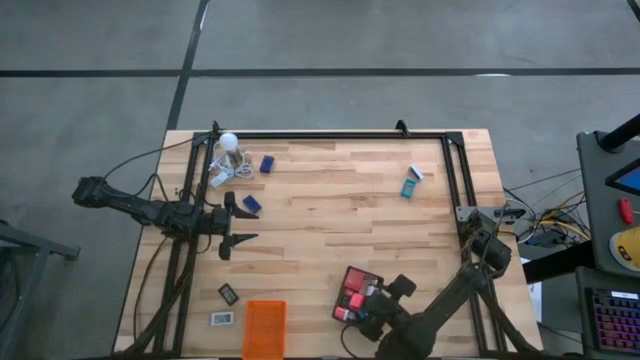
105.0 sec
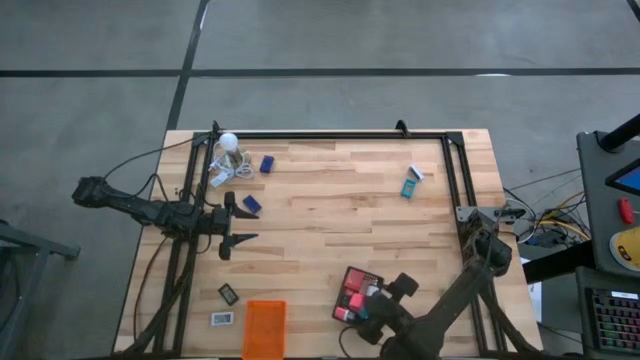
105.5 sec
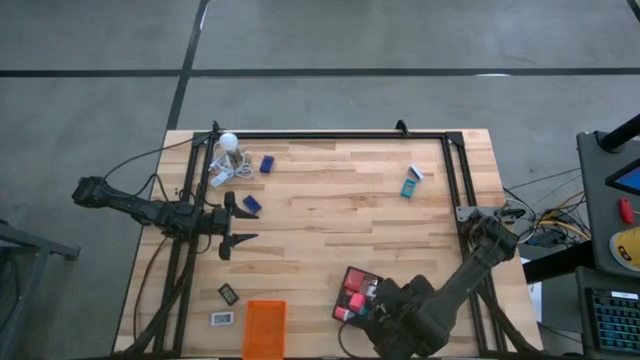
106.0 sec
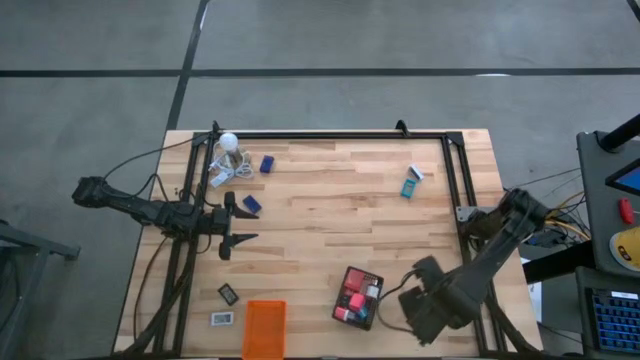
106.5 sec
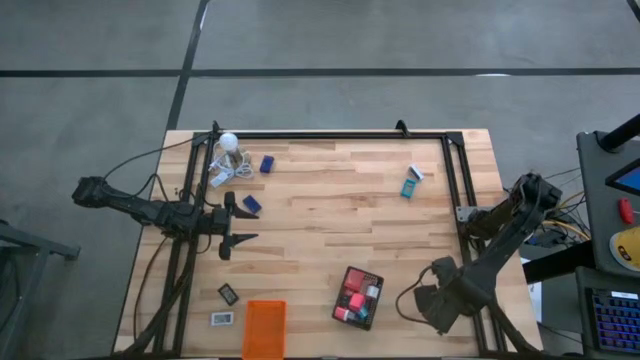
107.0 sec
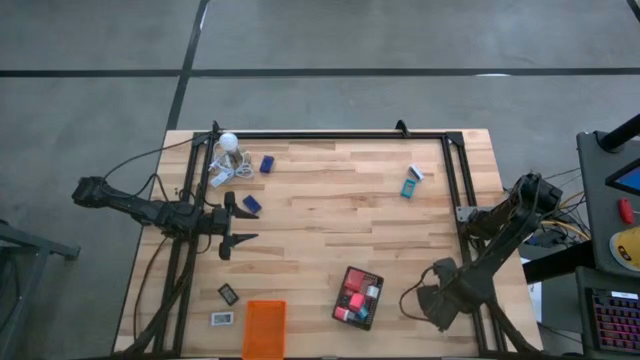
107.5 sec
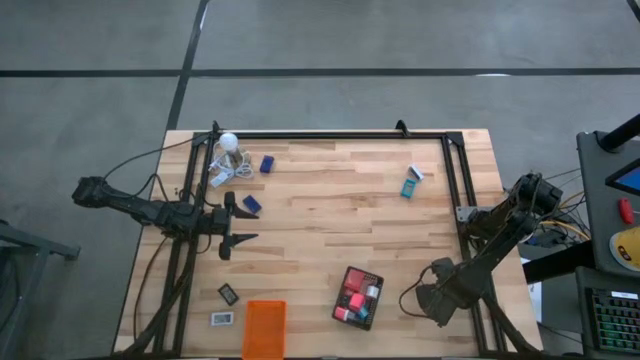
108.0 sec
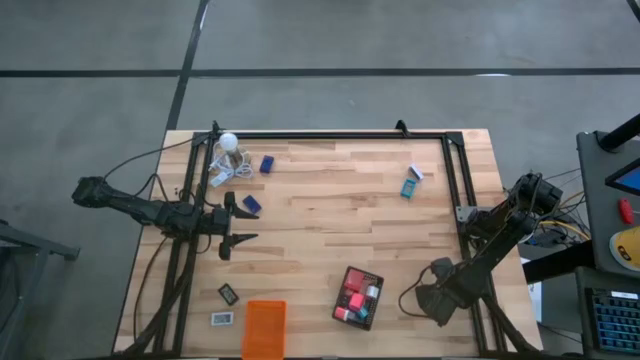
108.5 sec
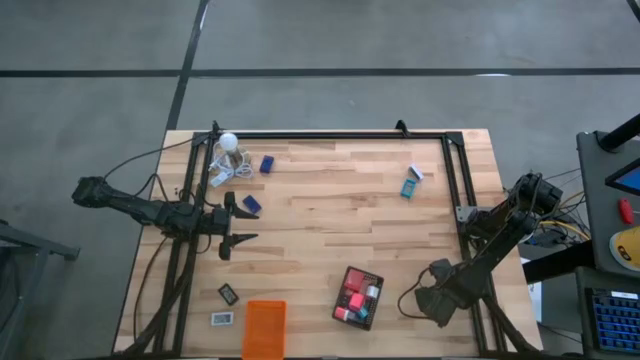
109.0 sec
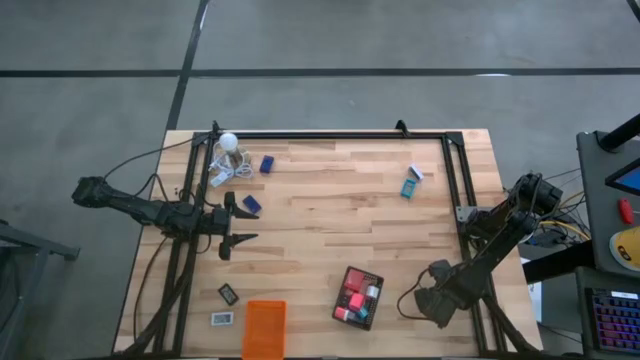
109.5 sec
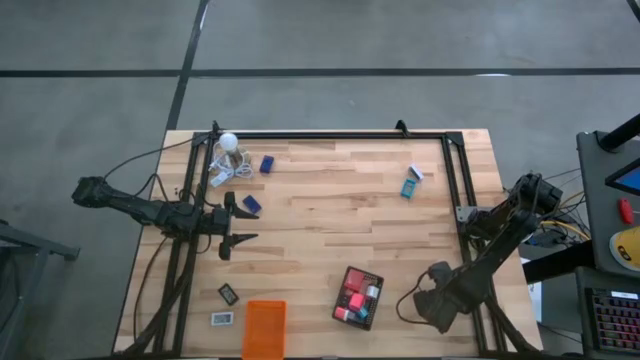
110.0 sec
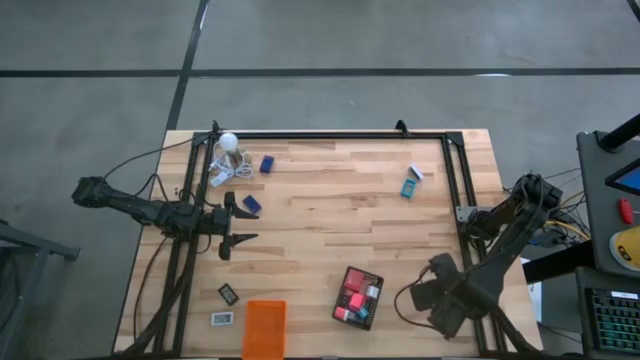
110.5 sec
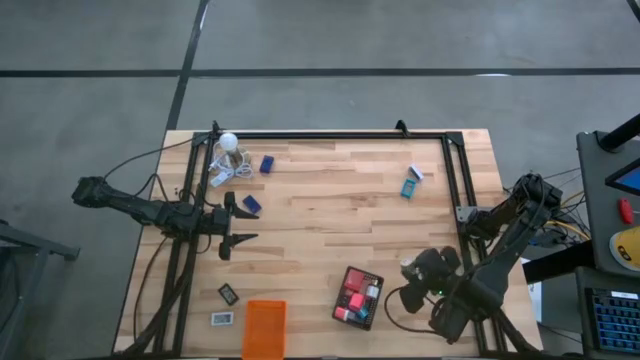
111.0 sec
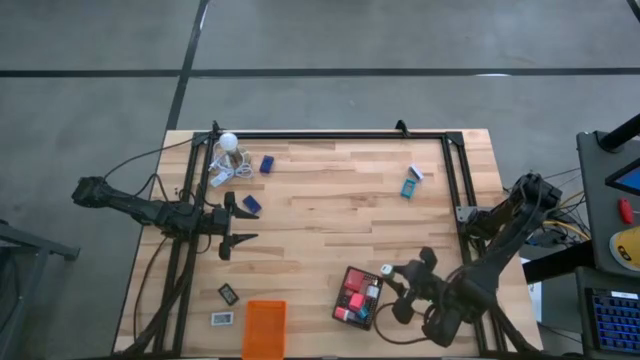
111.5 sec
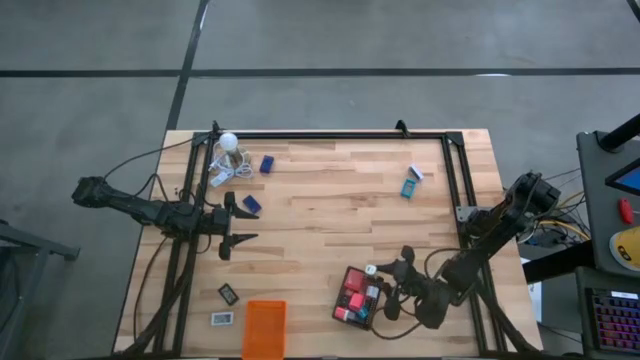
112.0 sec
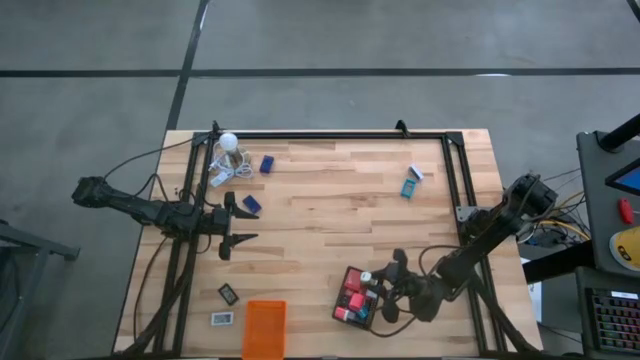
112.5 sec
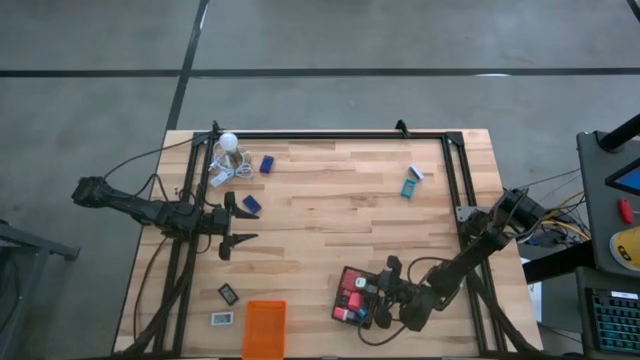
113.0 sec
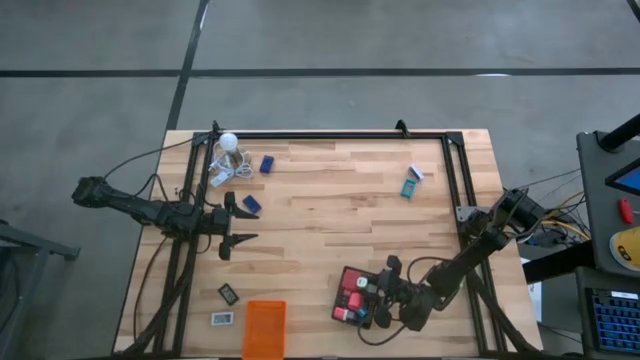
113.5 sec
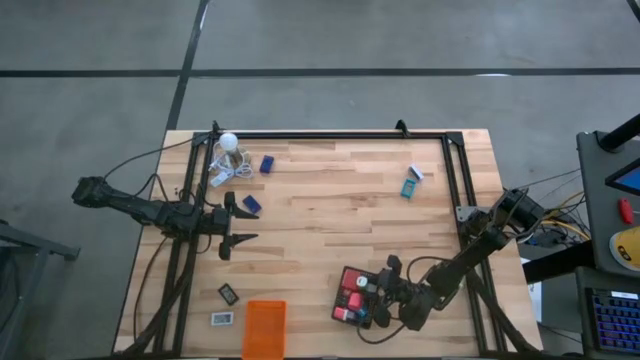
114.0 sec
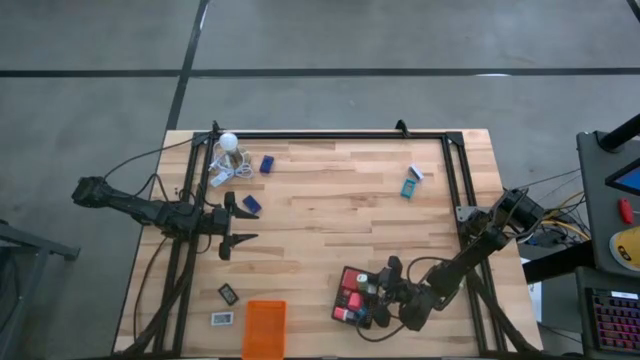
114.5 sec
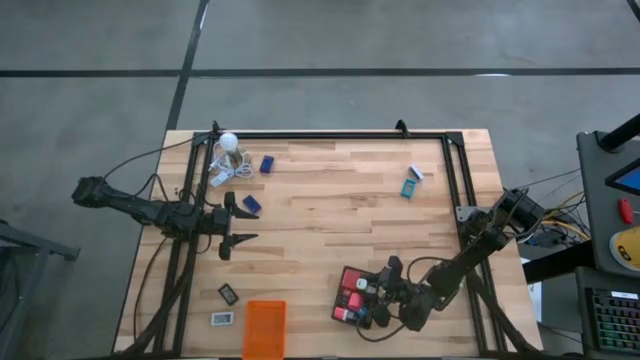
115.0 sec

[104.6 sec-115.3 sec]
Task: Pick & Place Office items
Put the left green charger adapter into the black bin

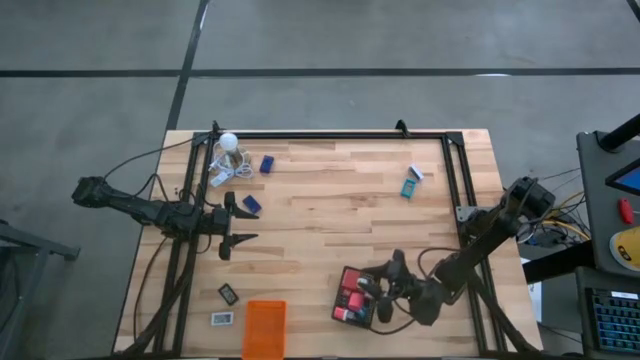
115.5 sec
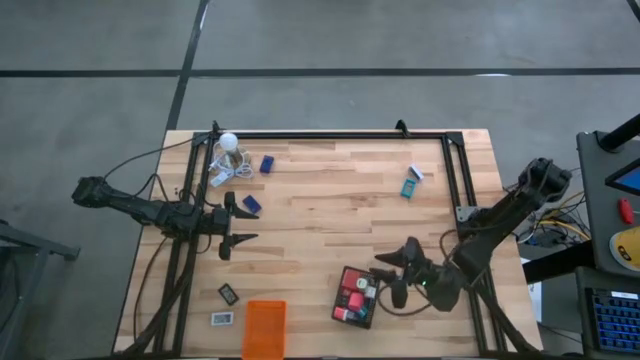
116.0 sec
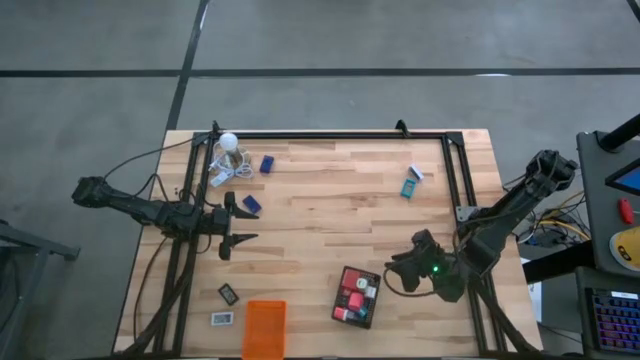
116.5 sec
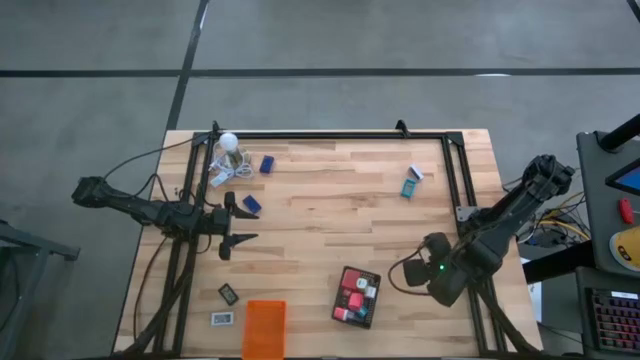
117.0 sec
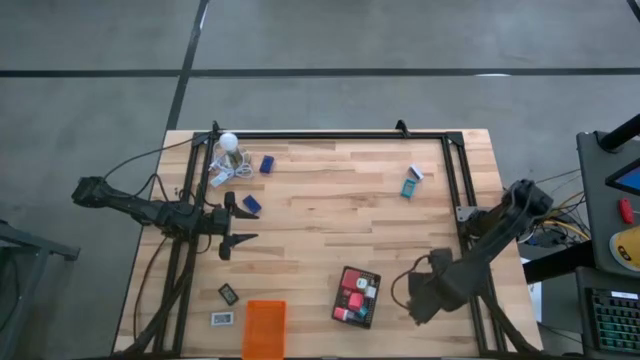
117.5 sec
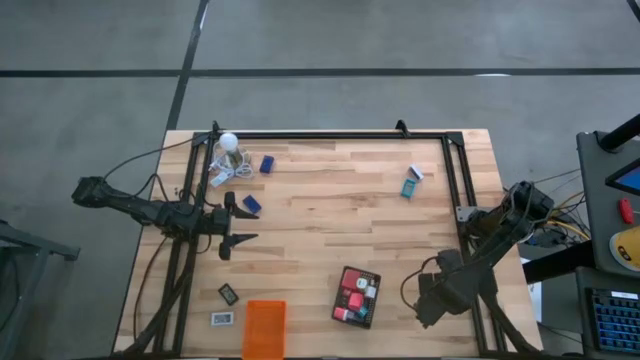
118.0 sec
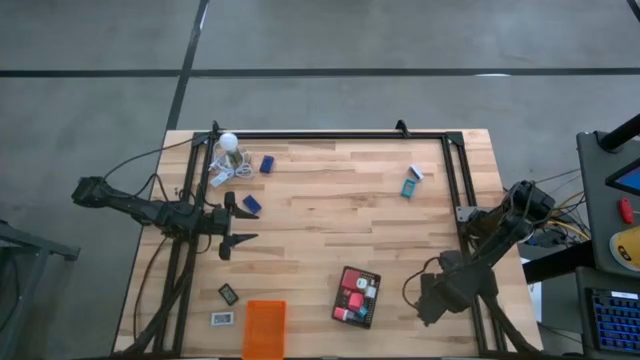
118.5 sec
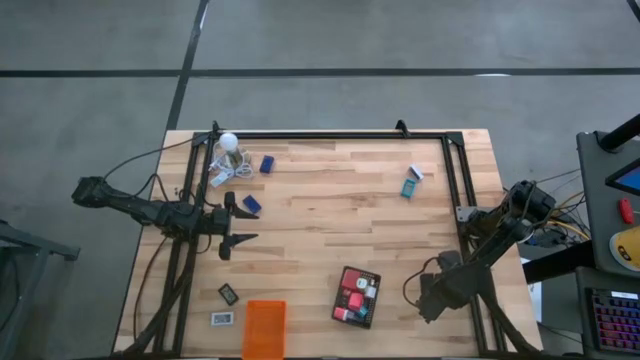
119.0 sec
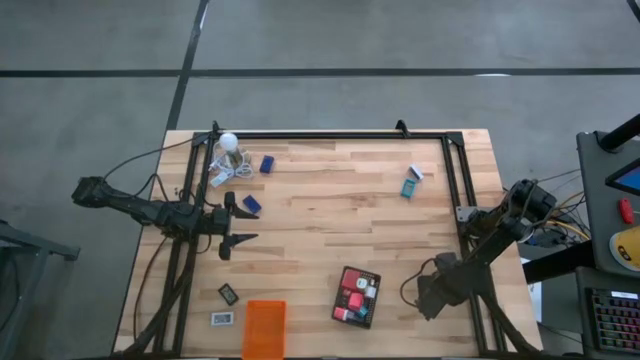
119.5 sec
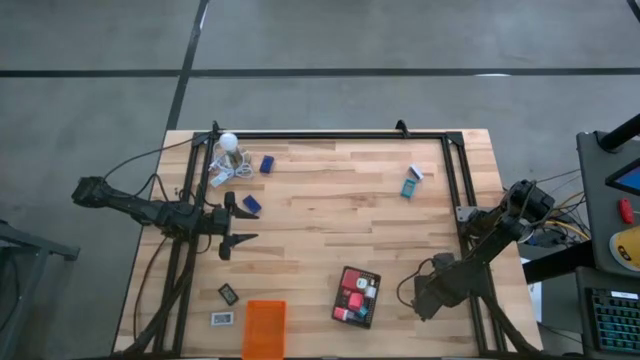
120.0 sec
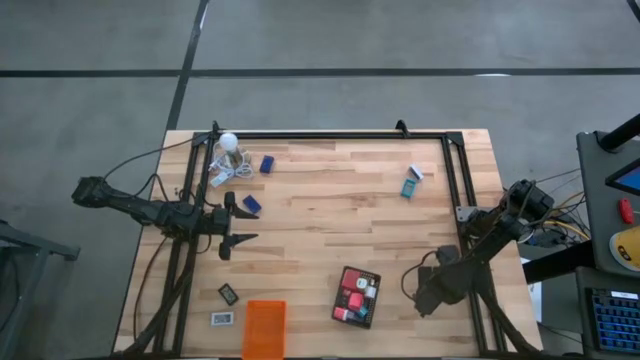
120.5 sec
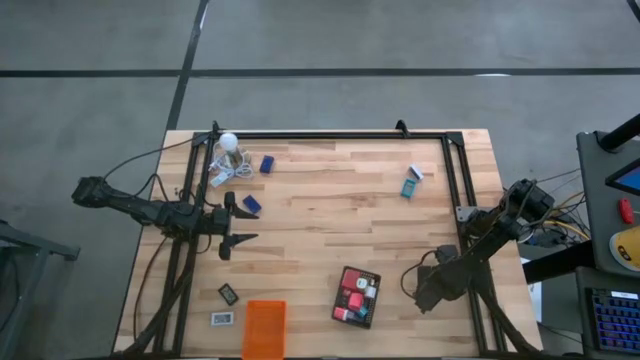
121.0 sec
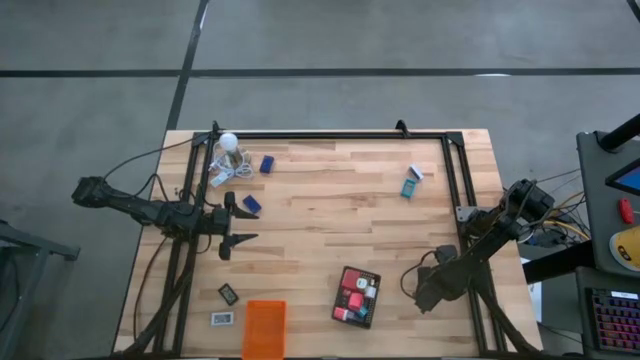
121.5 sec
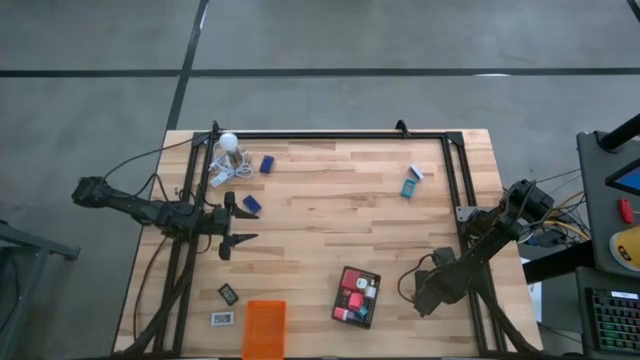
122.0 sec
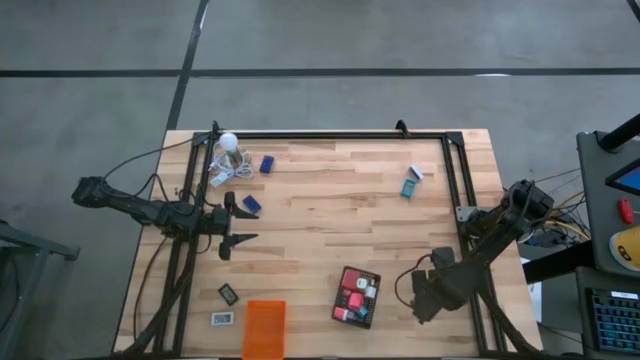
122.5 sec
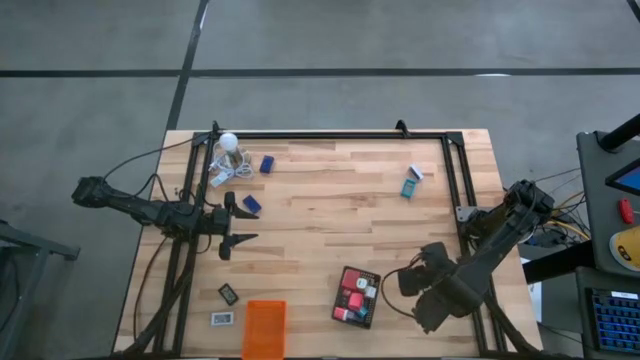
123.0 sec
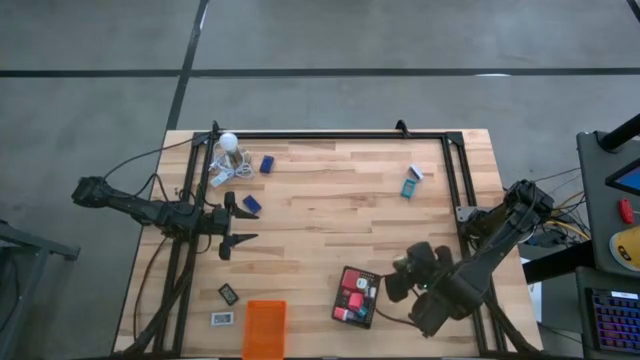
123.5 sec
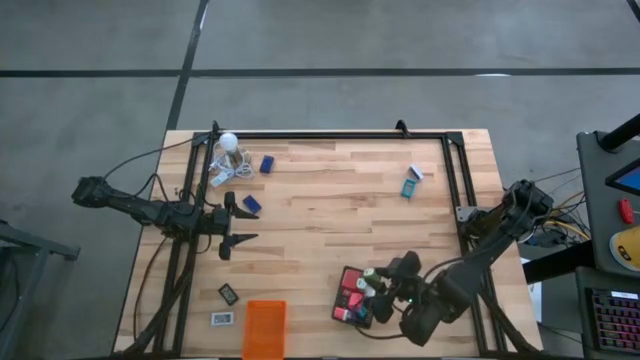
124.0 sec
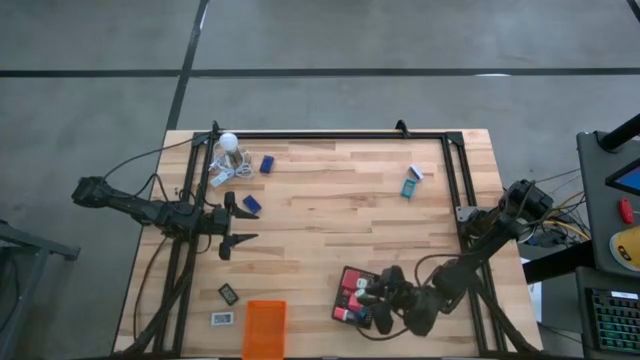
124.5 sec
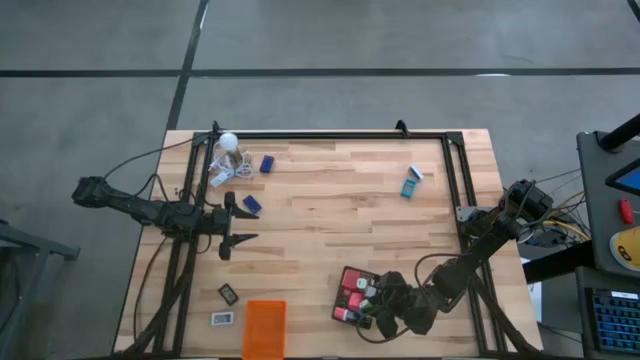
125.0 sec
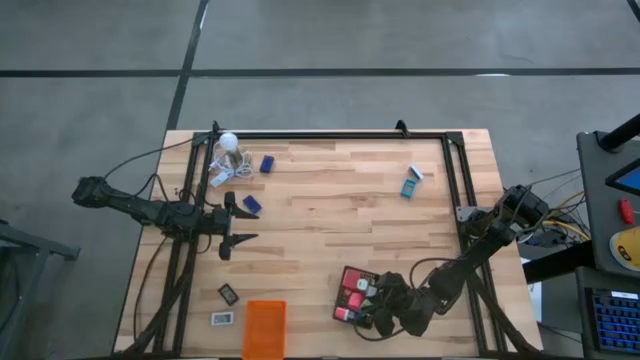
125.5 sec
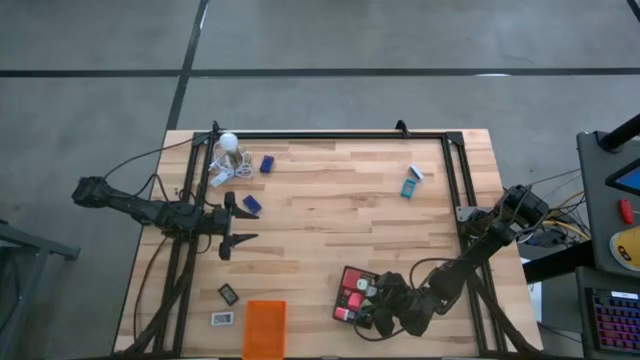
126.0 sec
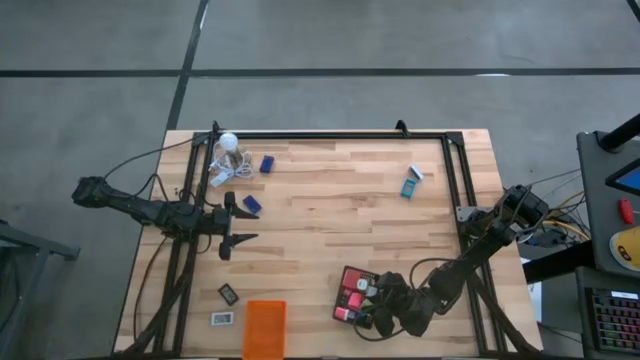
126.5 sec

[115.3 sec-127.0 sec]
Put the green charger adapter into the black bin
